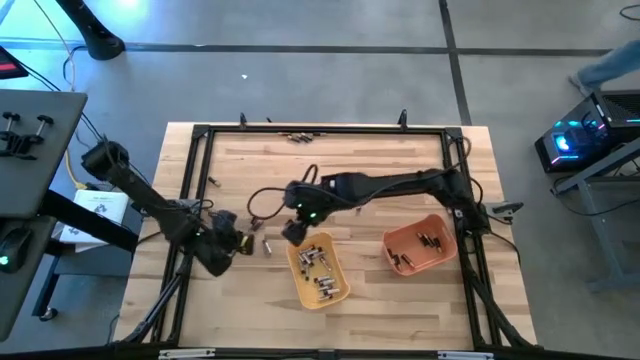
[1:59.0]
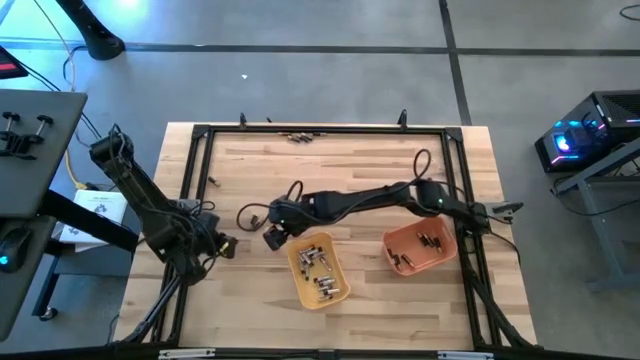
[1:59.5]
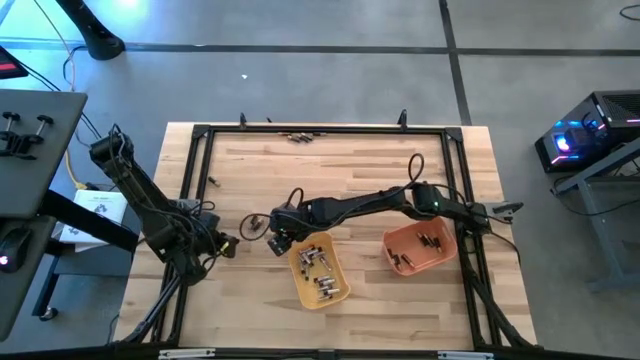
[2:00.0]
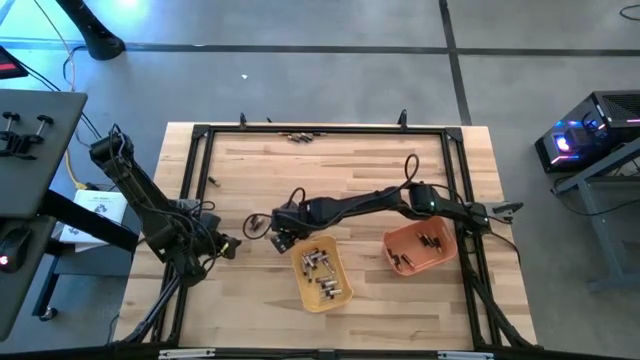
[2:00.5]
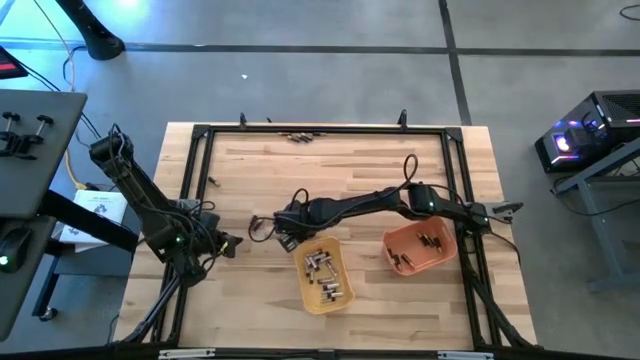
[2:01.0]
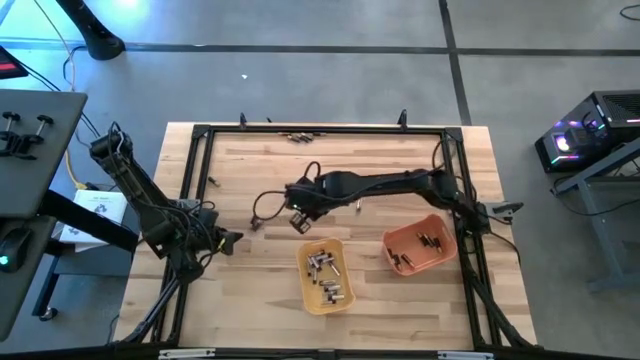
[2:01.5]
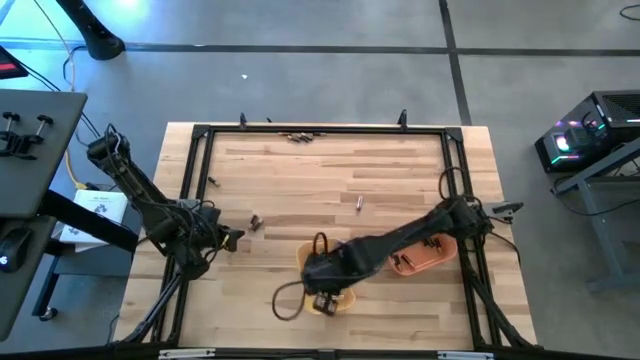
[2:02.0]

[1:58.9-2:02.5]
Task: Sort batteries
Put the silver battery into the yellow bin

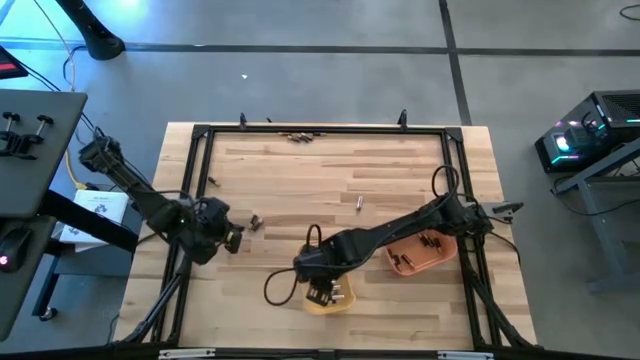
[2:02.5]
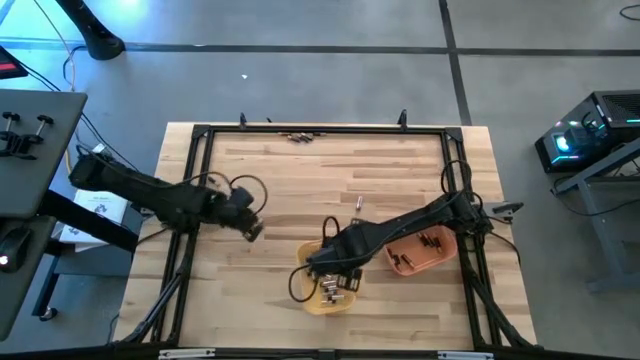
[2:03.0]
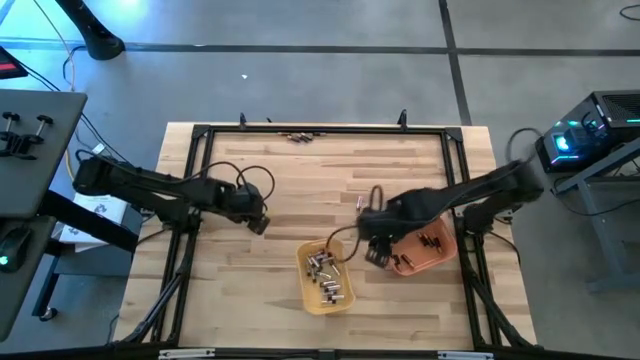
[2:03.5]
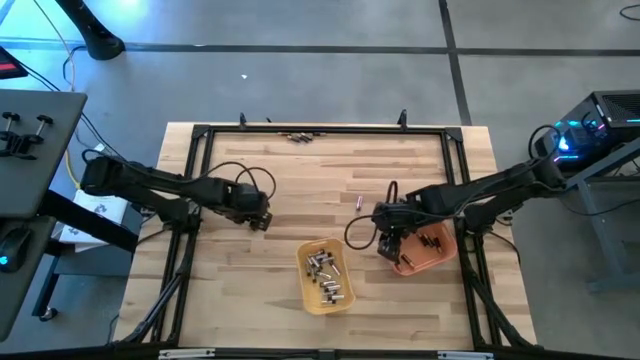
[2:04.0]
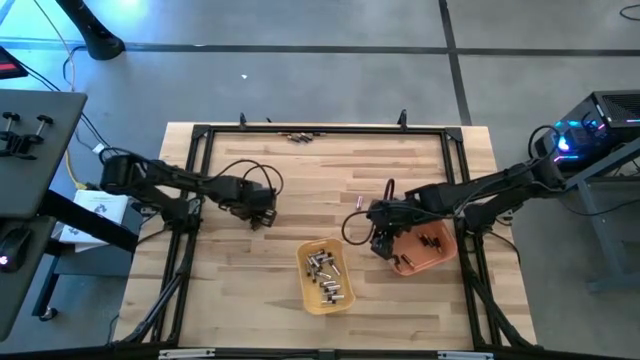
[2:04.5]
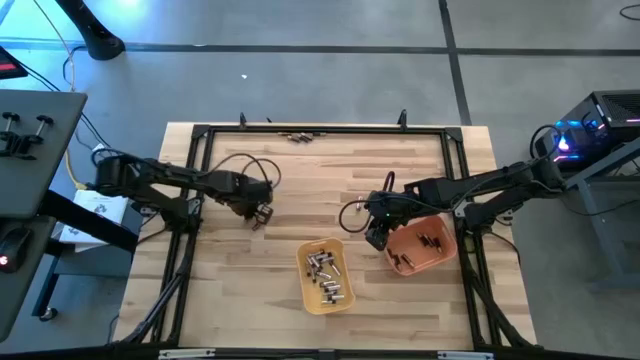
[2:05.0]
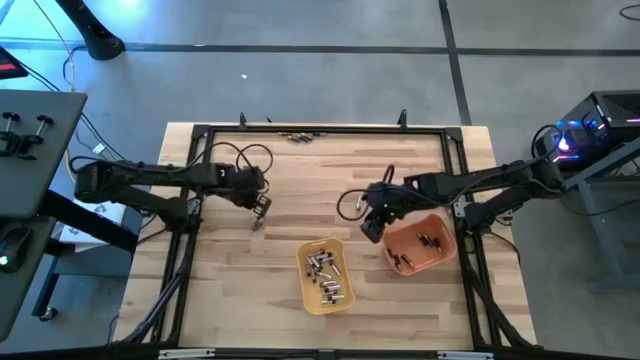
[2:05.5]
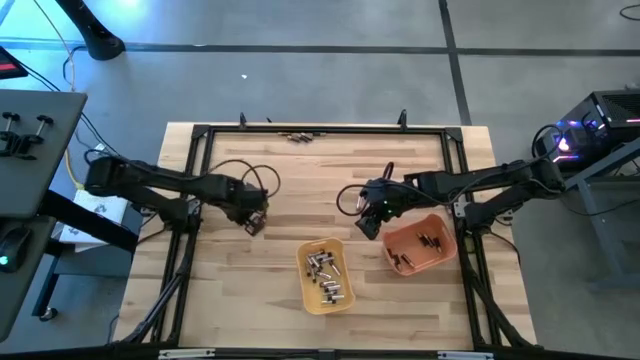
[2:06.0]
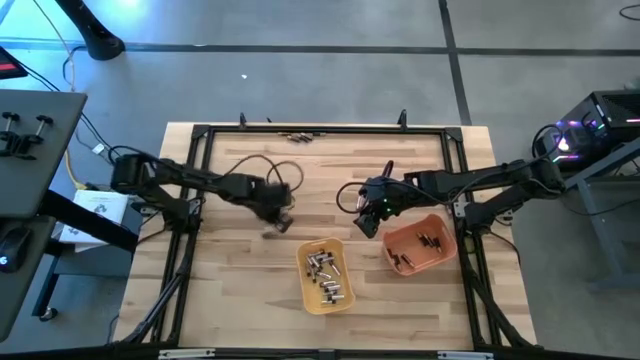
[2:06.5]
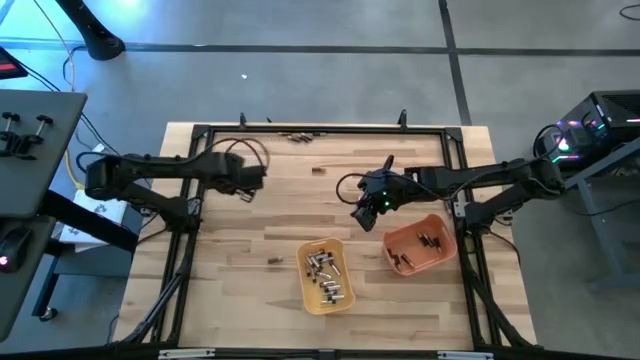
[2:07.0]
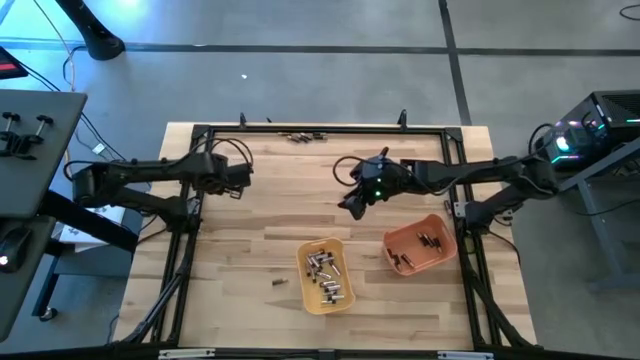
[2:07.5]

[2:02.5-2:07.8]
Put the black battery into the orange bin

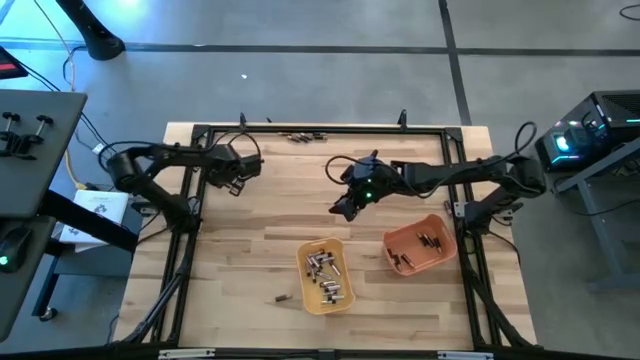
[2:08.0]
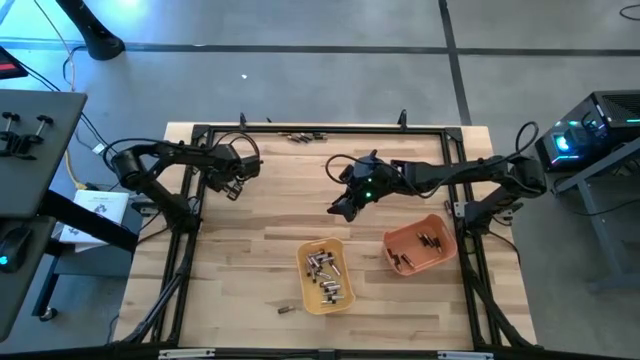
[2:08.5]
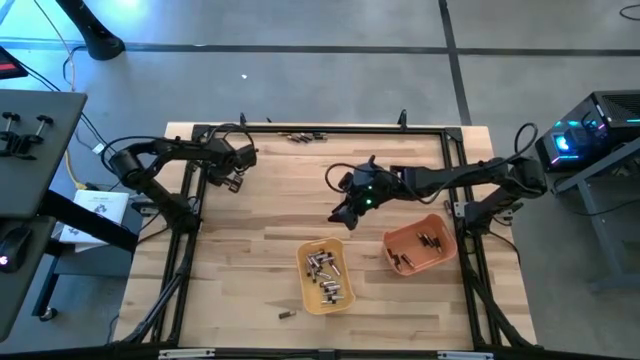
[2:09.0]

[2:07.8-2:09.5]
Adjust the black battery

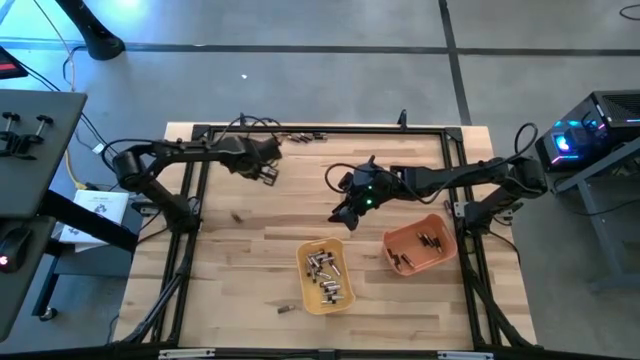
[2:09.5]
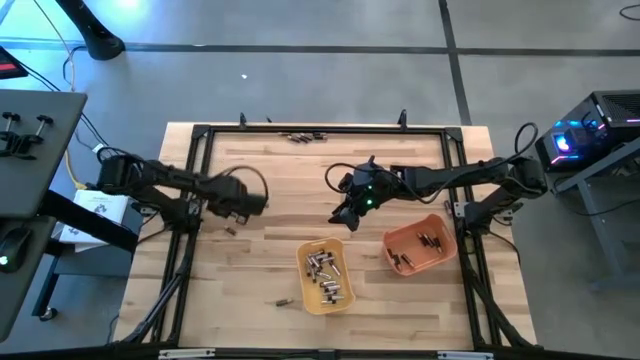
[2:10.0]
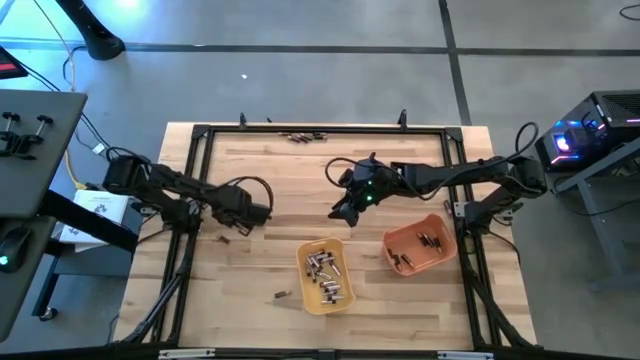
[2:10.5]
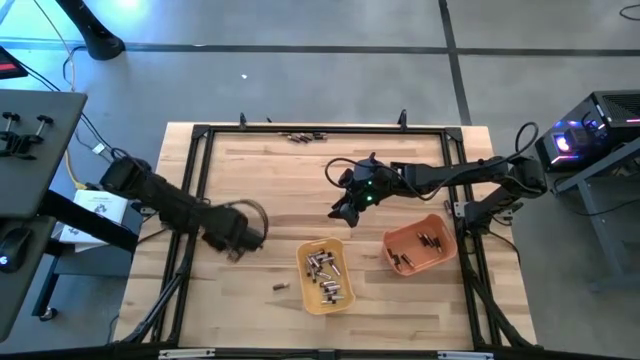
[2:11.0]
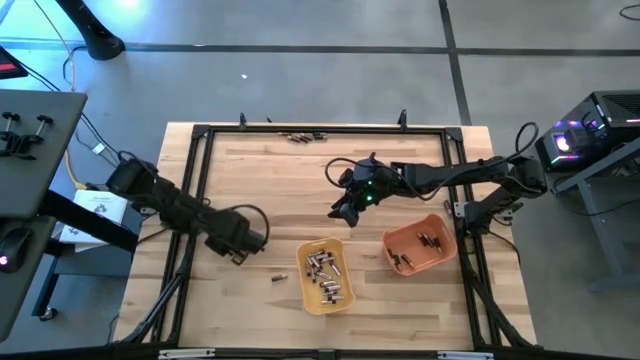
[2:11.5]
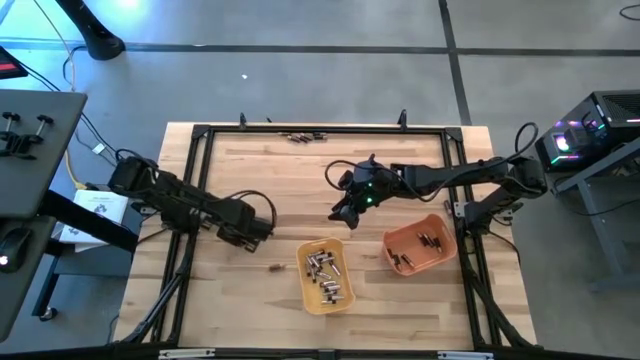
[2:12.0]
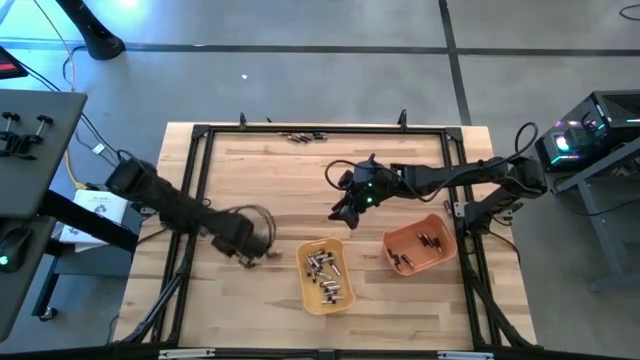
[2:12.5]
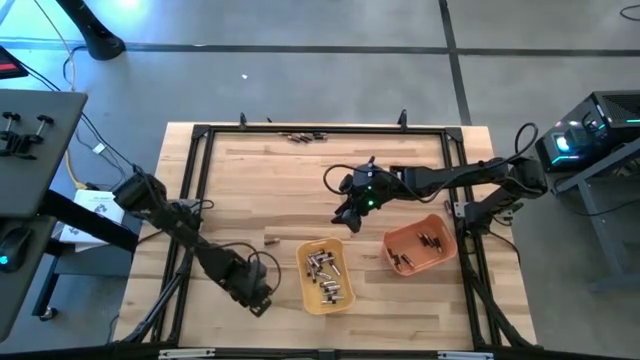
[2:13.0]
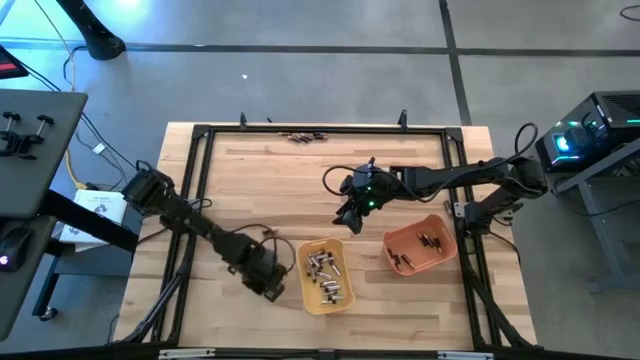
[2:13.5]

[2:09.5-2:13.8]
Adjust the black battery

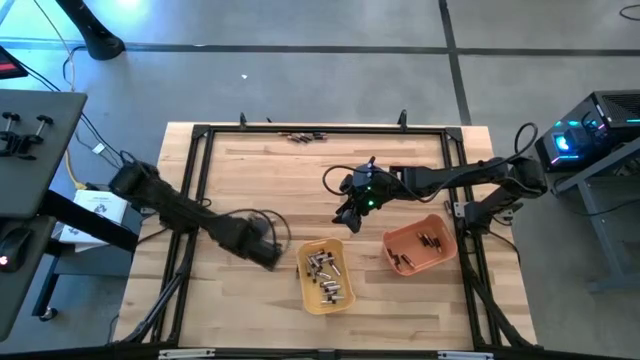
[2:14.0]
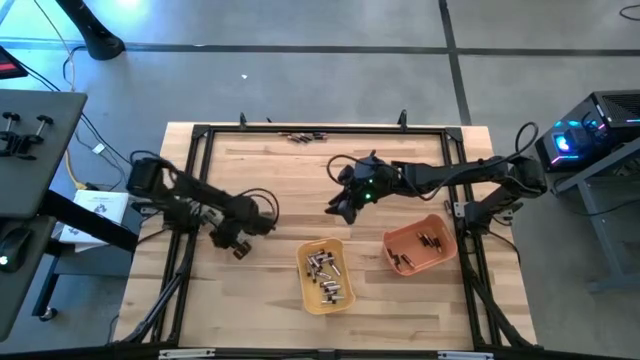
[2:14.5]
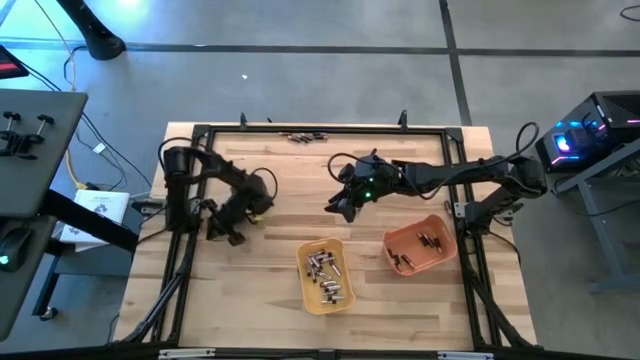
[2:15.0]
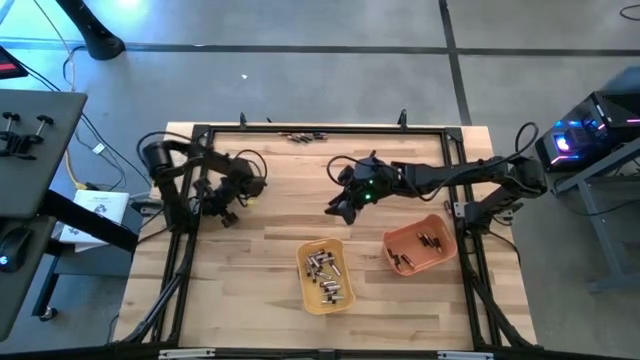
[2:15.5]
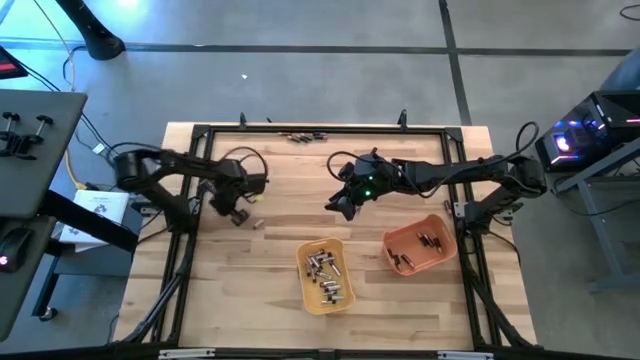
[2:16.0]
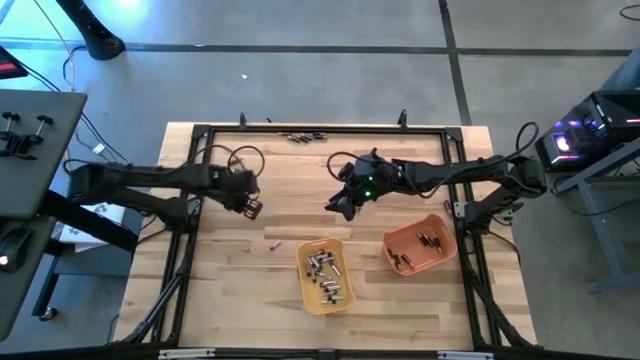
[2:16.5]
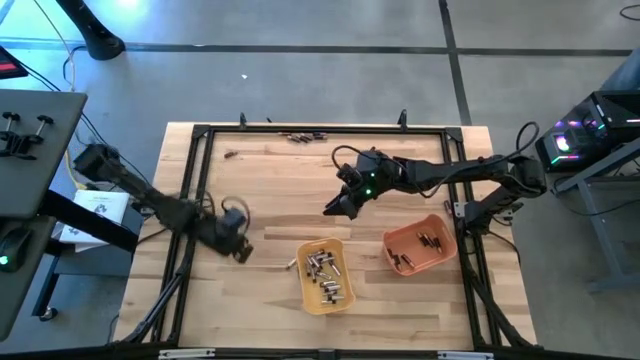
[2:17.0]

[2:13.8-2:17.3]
Adjust the silver battery

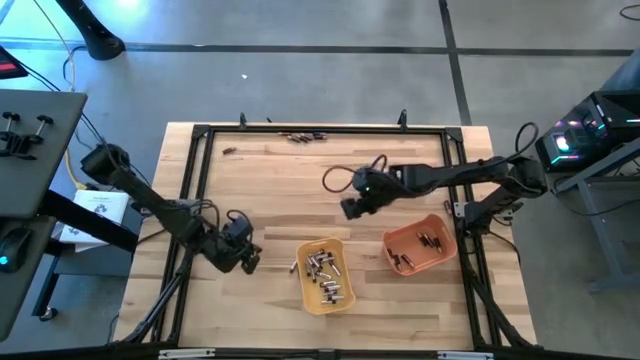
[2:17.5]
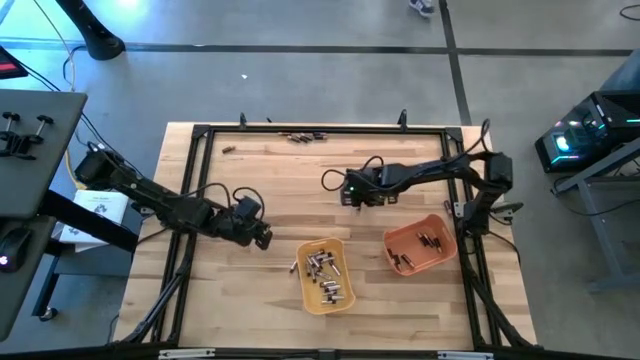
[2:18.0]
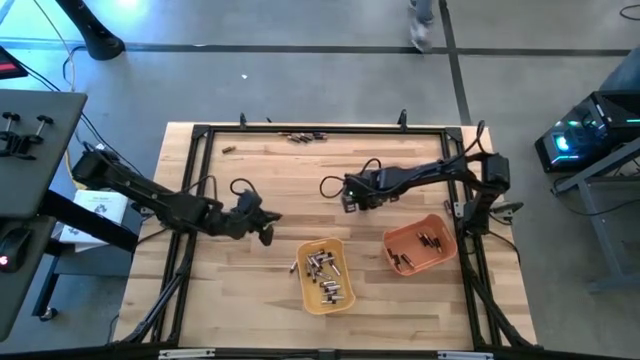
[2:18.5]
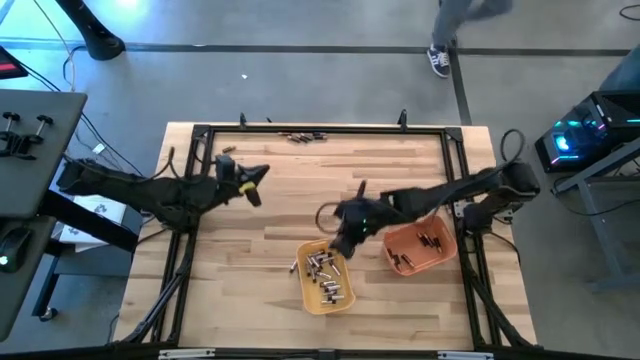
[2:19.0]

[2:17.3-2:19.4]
Put the silver battery into the yellow bin

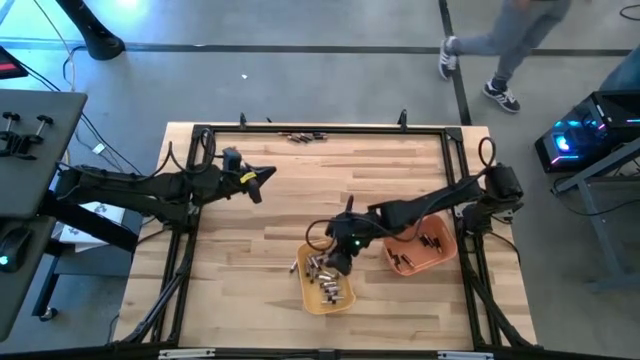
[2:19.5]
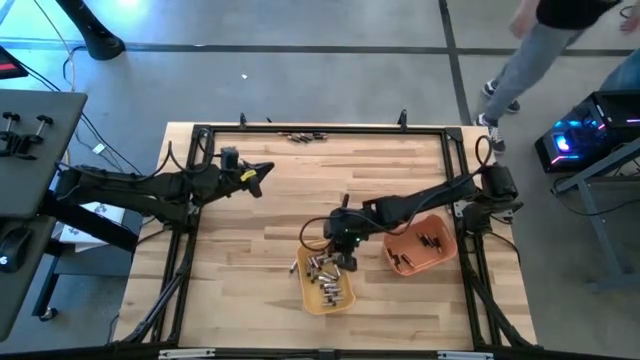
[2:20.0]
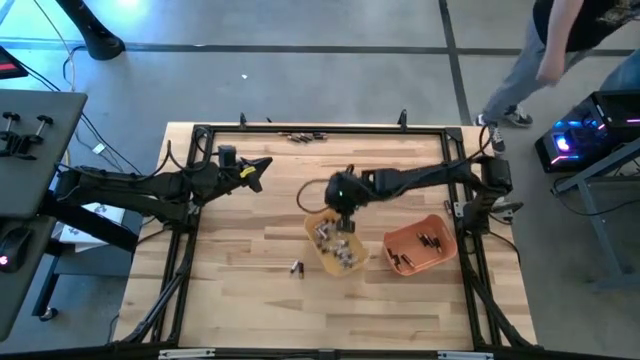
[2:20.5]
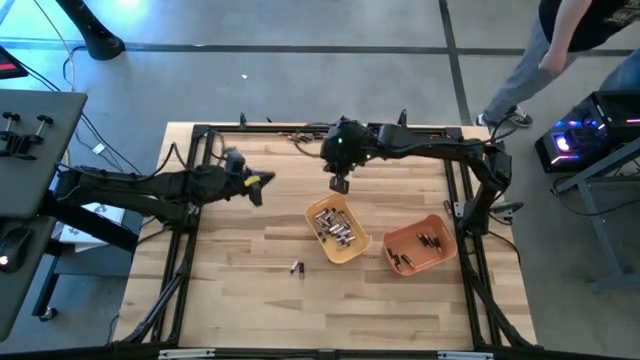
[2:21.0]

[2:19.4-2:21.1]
Move the yellow bin to the center of the table
